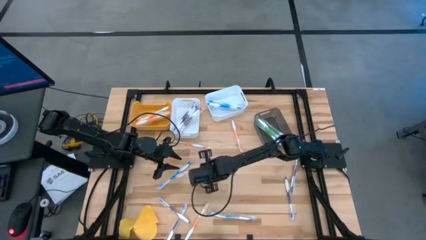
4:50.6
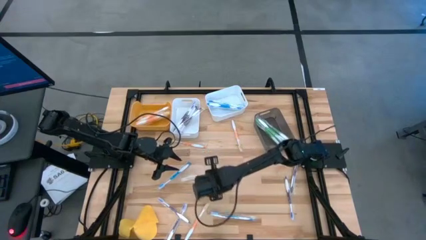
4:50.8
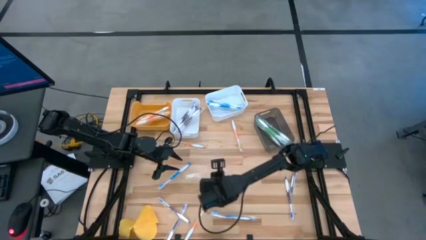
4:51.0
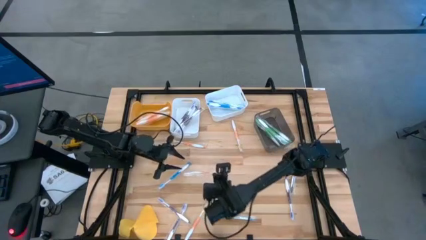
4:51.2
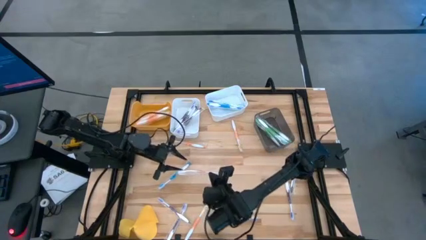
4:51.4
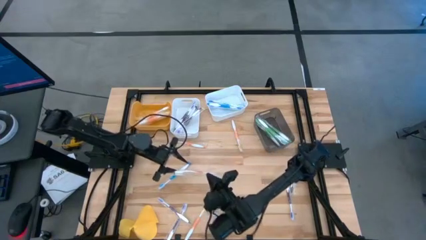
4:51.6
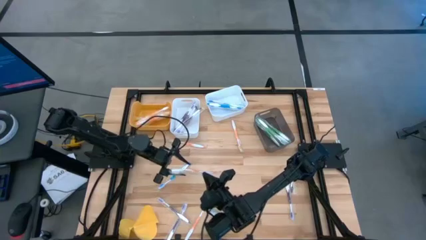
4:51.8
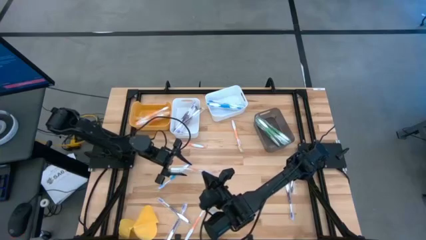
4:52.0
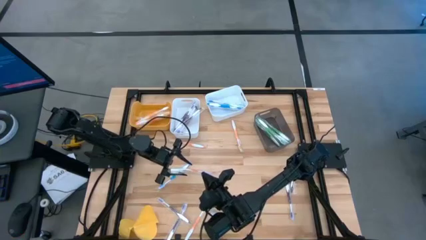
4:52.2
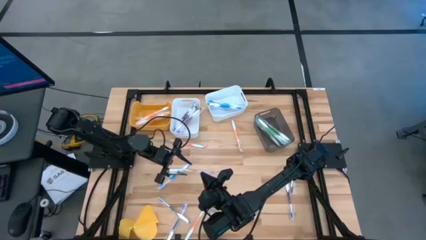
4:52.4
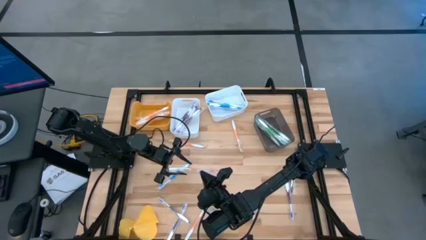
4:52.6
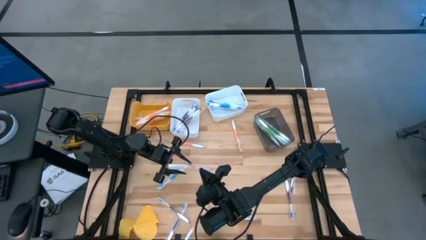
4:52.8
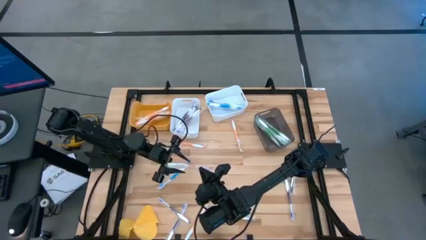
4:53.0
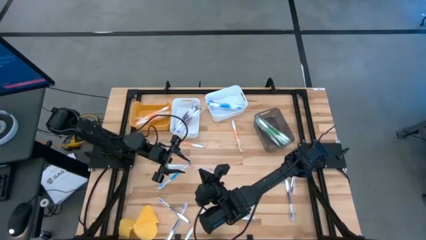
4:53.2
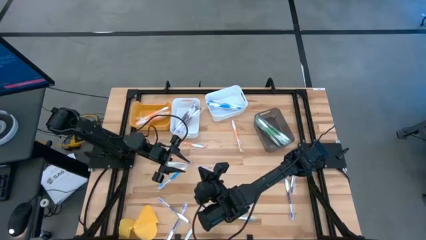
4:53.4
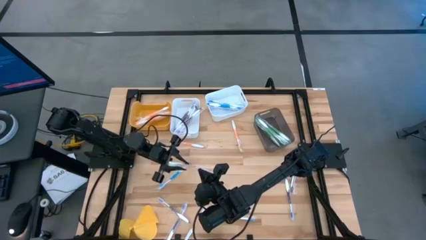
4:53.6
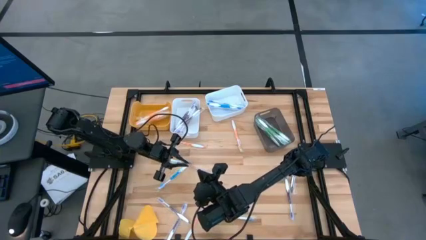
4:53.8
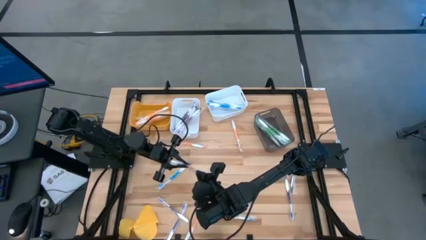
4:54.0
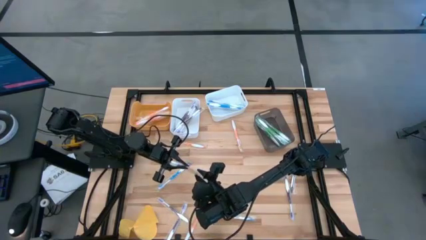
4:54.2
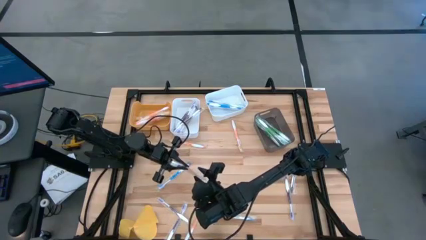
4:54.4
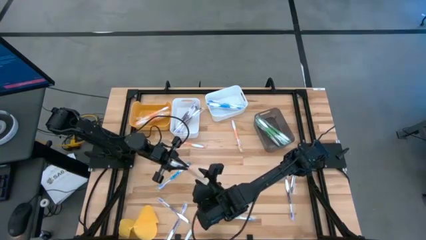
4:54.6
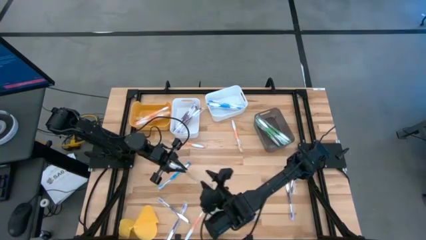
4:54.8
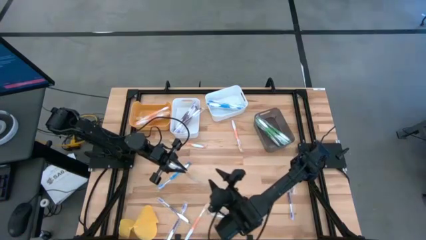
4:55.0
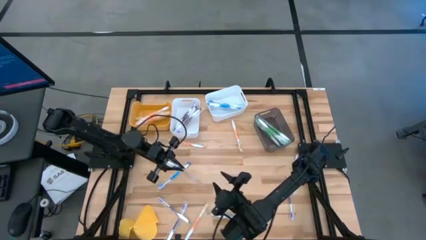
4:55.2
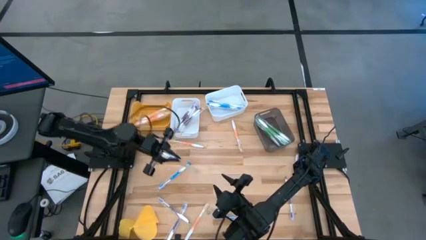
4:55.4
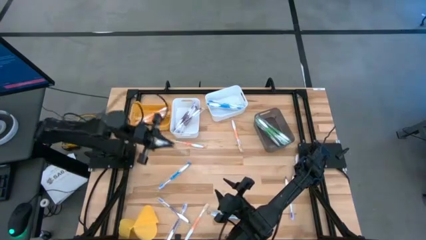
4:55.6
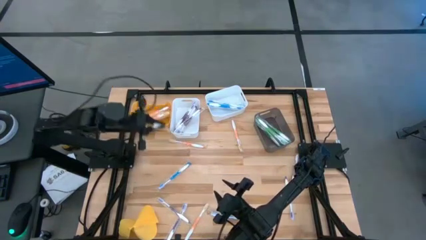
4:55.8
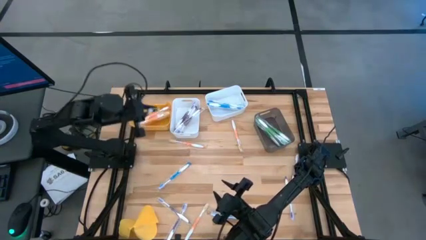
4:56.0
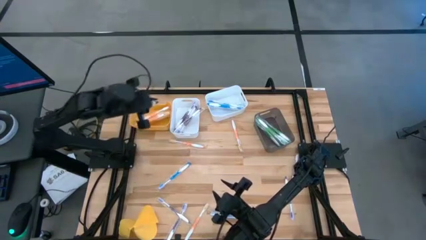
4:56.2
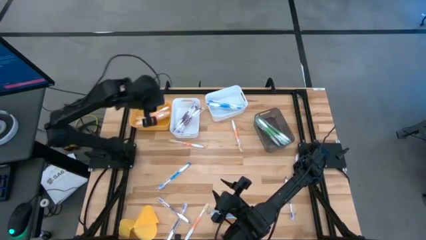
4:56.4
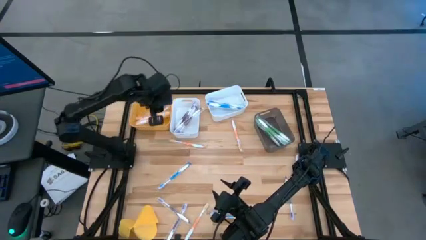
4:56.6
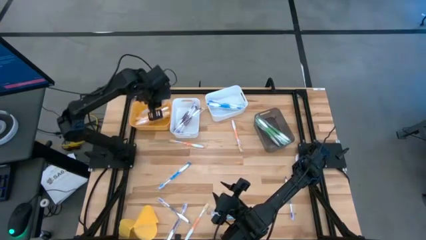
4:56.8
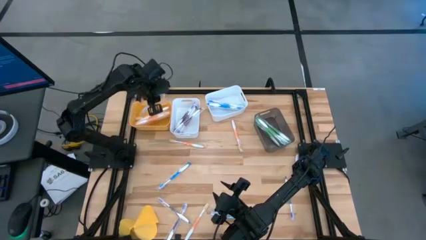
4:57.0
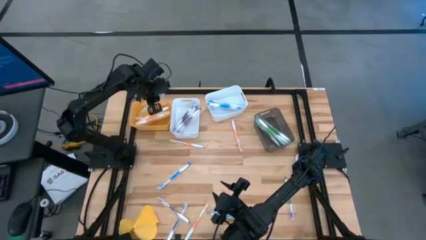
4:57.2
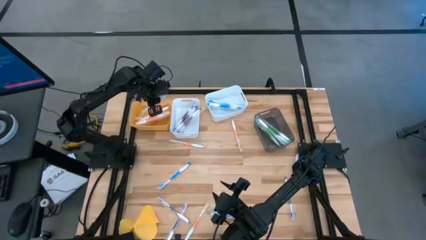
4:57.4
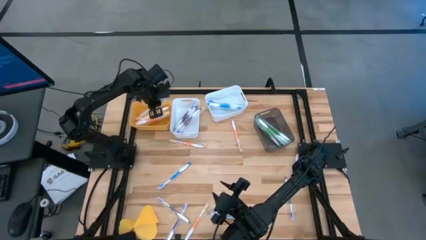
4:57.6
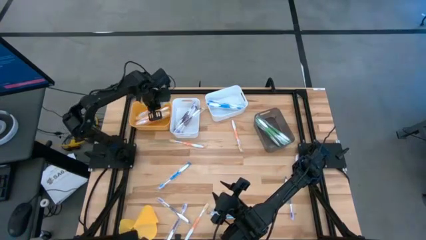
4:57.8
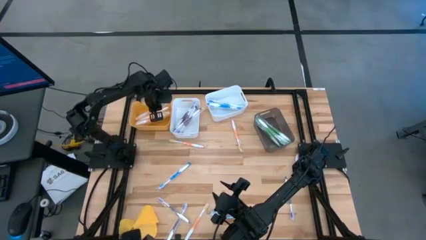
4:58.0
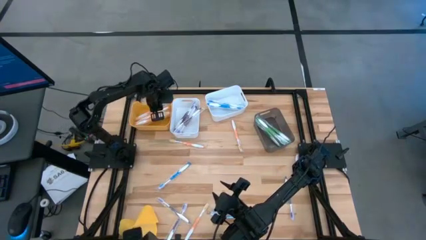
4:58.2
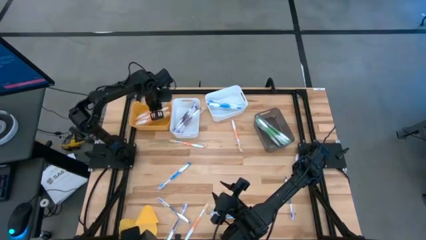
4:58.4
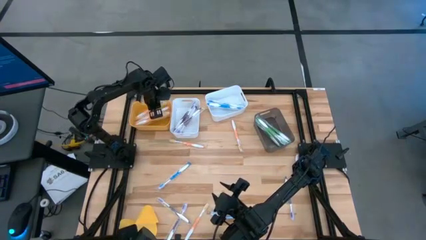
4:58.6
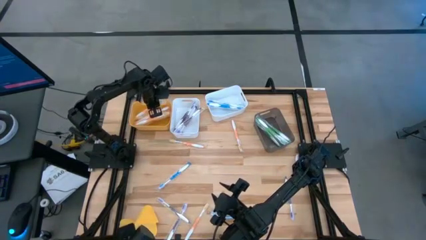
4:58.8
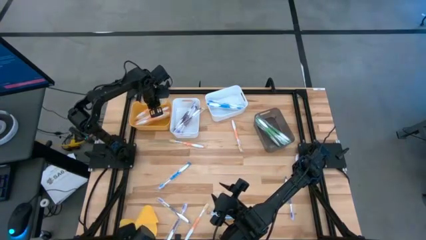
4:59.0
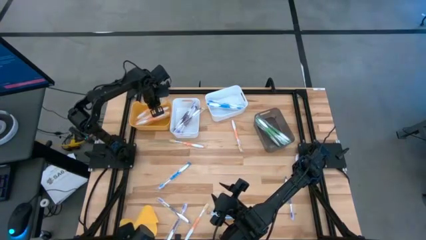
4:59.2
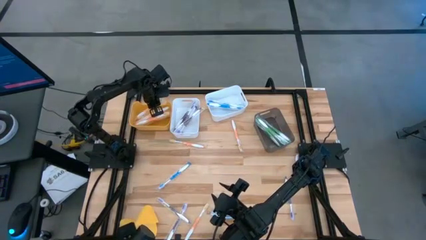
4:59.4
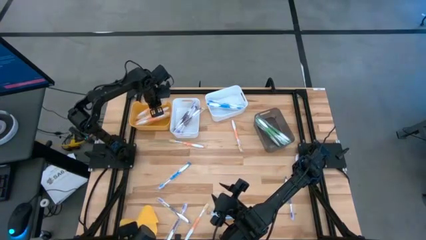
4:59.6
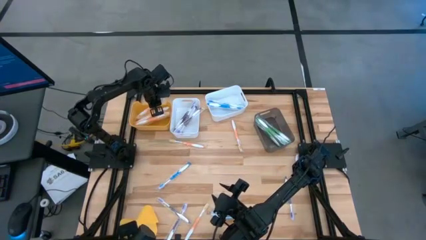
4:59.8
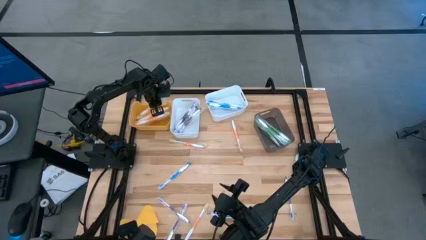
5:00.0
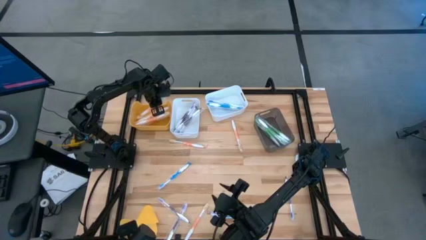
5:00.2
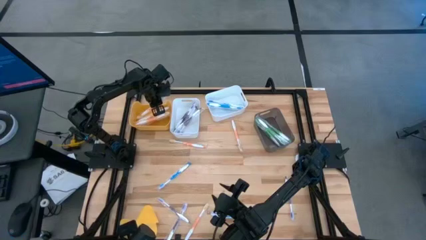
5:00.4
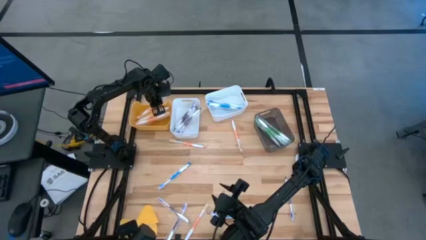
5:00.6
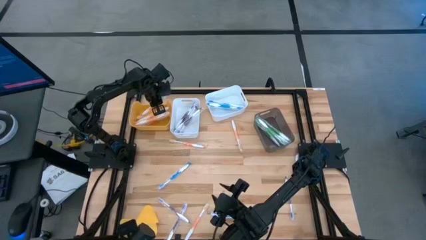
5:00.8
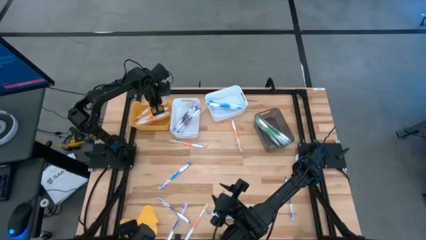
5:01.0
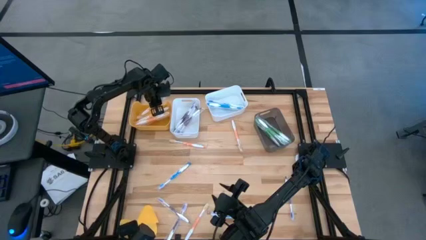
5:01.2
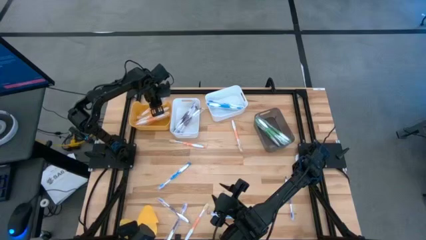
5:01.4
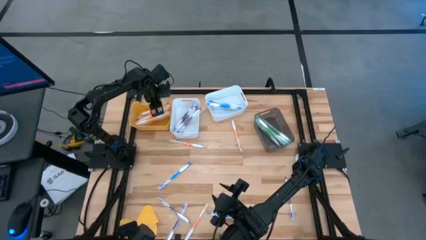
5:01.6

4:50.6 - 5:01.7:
Task: Pick & Place Toothbrushes
Put the orange toothbrush into the yellow bin
